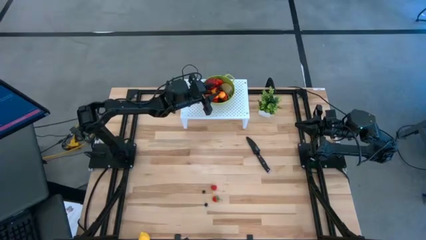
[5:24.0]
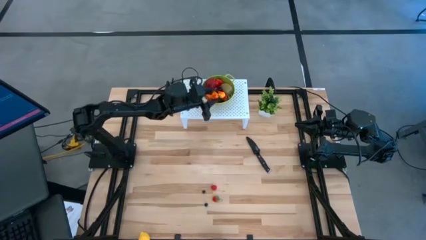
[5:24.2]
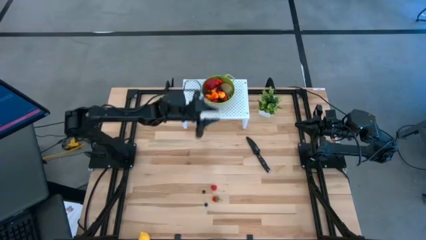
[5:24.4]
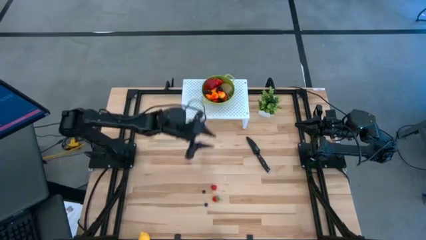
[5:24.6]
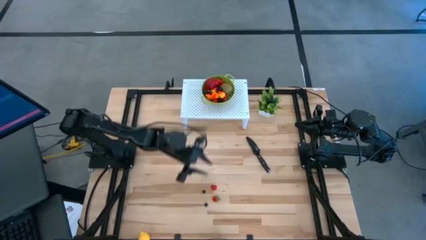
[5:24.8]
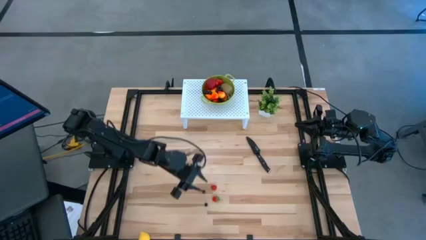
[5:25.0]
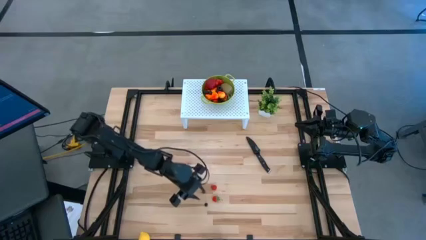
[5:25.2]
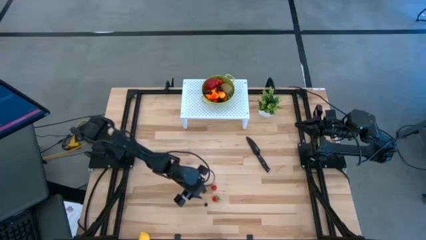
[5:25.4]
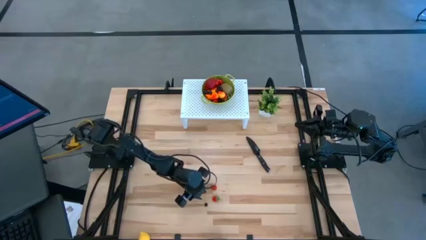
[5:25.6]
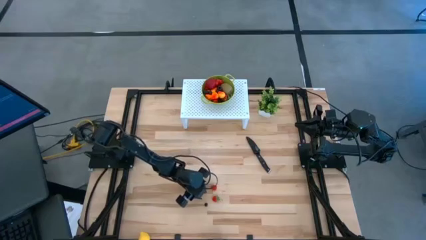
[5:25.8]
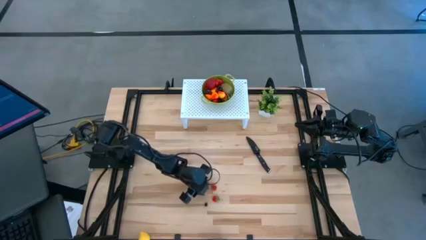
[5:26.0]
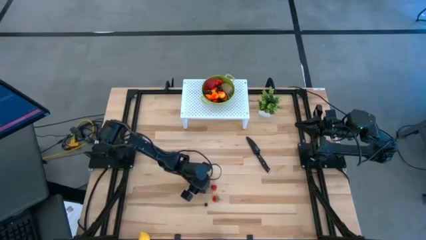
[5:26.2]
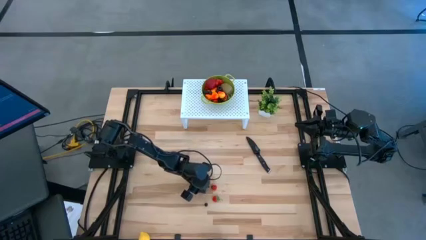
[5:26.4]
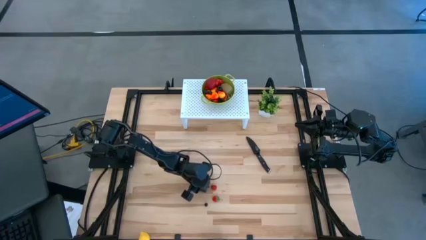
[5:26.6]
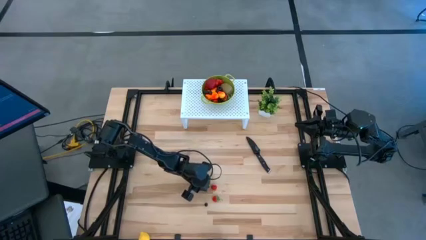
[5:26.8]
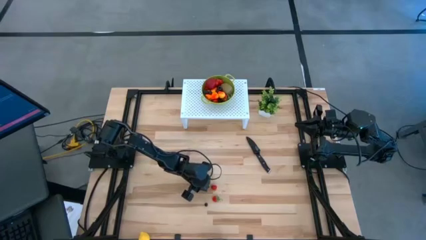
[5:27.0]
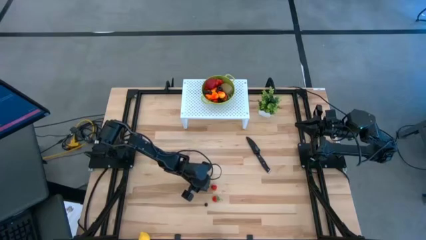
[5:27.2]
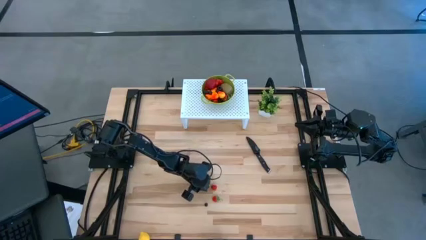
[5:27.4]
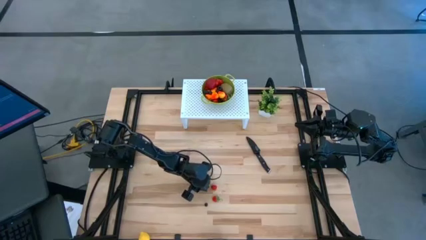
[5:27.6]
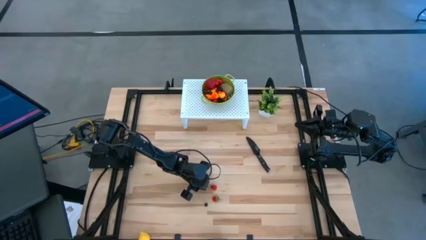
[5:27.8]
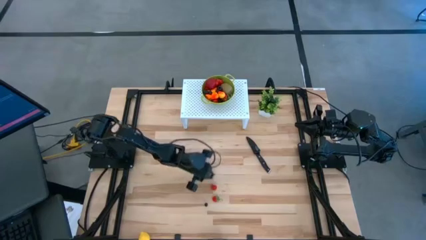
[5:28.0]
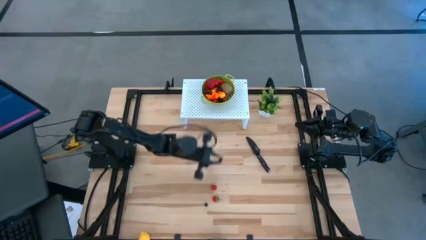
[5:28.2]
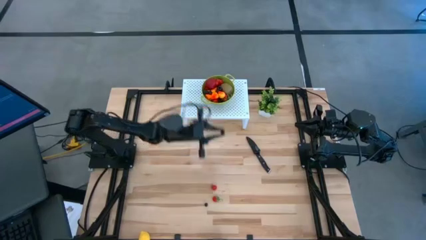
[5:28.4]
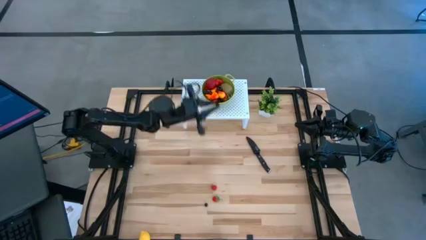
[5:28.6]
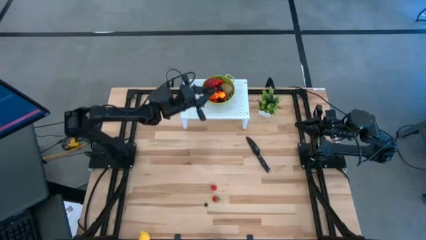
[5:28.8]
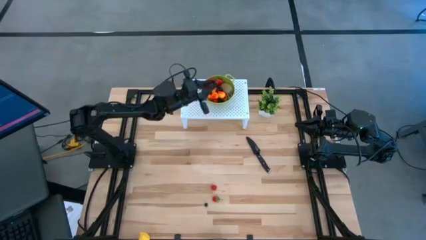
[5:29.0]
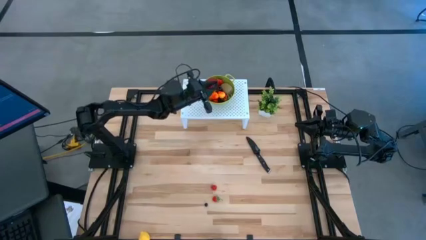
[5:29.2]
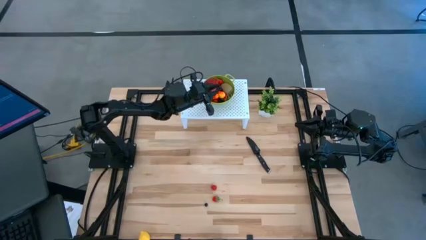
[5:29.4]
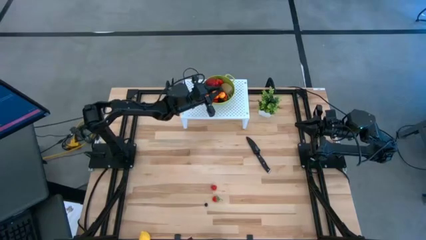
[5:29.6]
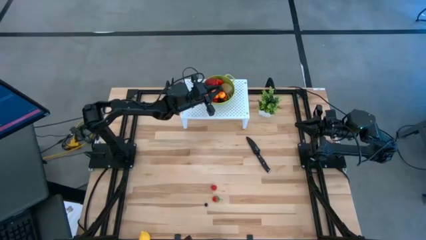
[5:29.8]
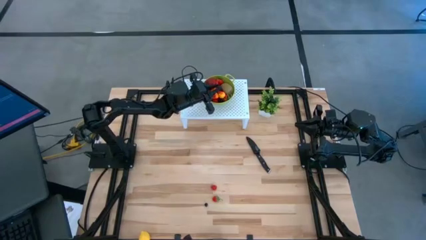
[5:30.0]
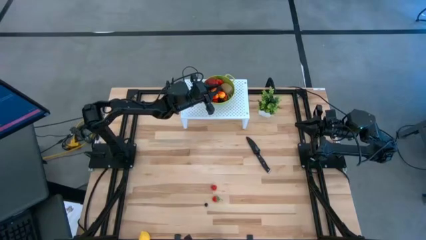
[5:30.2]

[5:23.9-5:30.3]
Task: Pick & Place Fruit
Put the black blueberry into the green strainer bowl

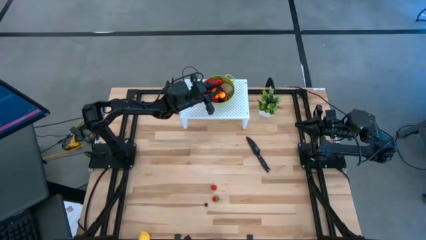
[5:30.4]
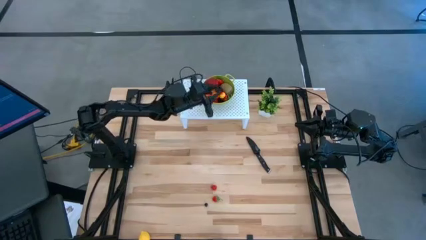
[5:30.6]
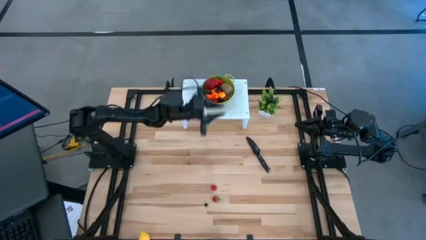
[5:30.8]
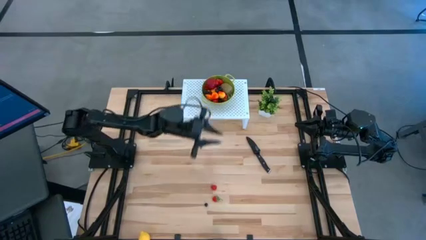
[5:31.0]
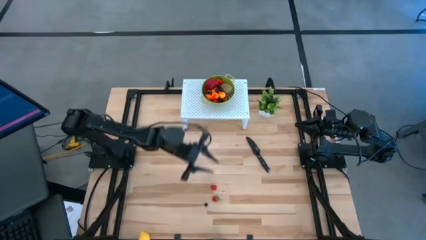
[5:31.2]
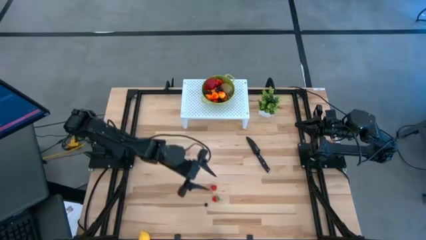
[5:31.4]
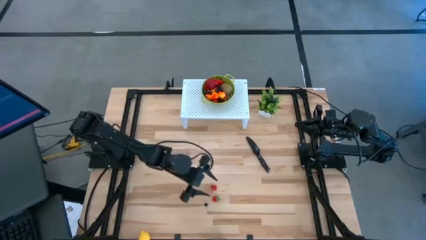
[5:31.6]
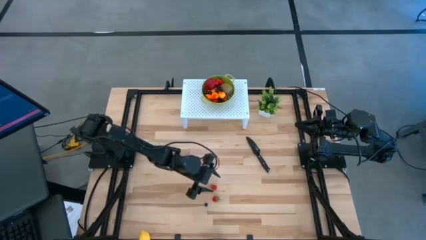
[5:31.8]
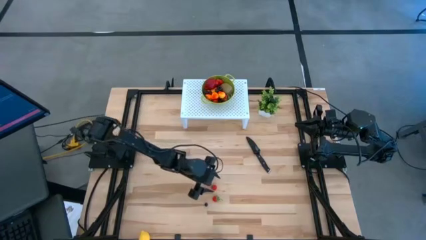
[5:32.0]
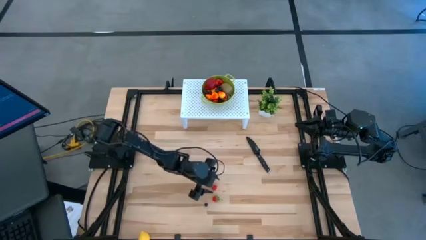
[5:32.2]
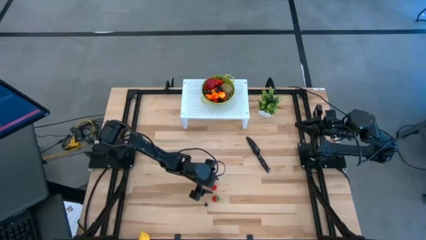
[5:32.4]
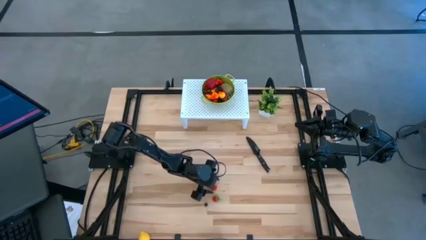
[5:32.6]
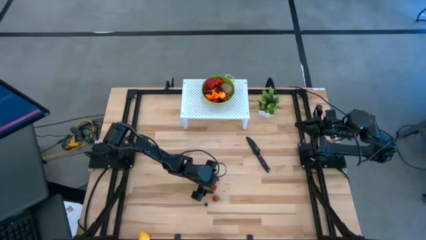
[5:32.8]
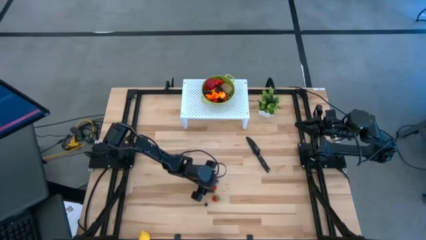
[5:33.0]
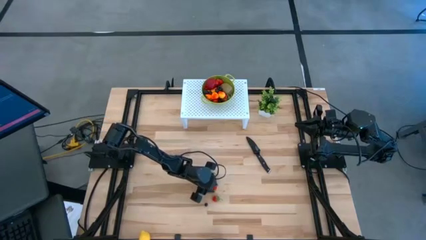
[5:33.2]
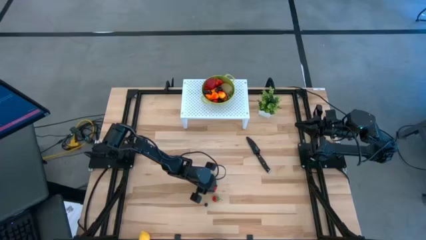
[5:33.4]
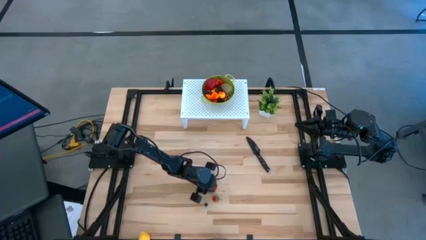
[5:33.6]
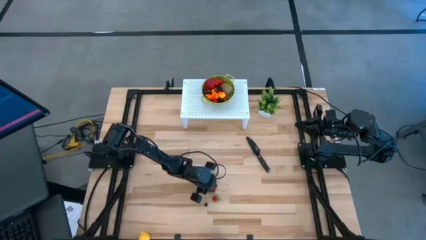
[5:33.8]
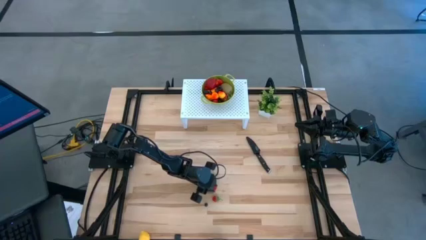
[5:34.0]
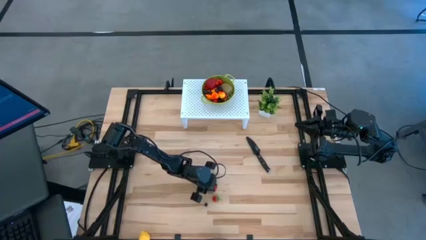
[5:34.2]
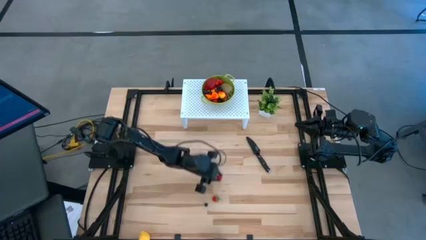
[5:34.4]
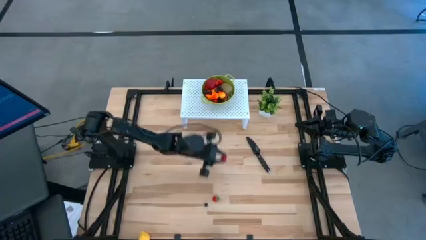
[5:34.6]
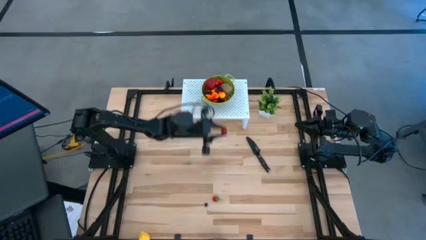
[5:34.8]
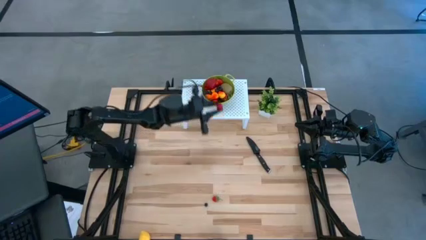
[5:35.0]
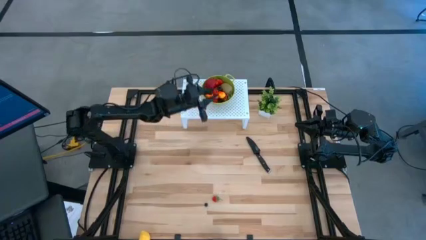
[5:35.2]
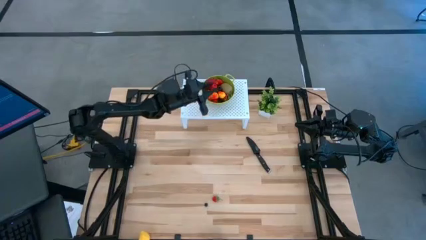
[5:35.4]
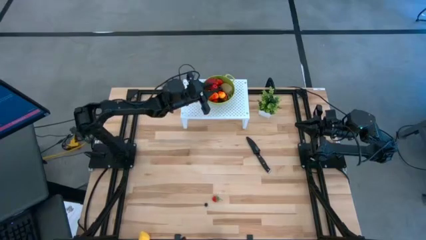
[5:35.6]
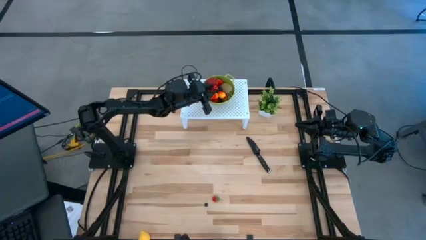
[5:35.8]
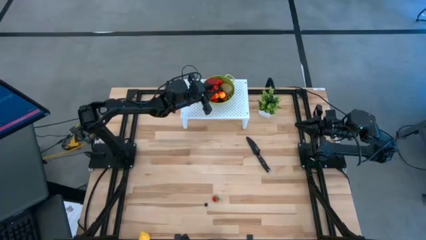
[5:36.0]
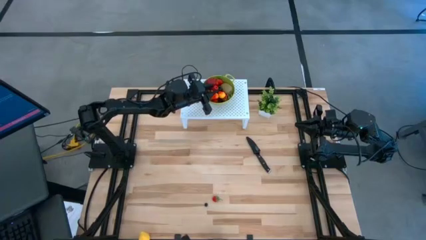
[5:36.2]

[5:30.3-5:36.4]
Put the red raspberry into the green strainer bowl

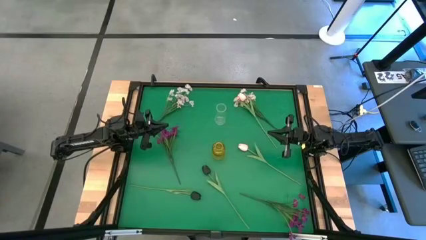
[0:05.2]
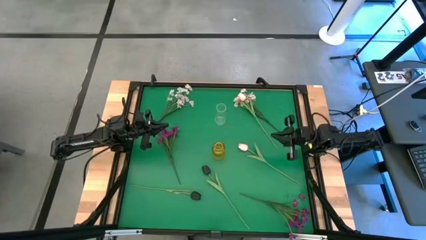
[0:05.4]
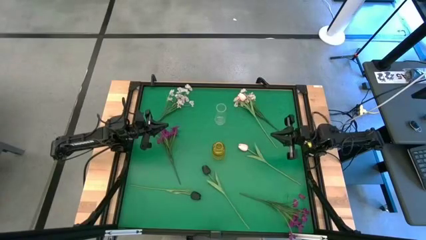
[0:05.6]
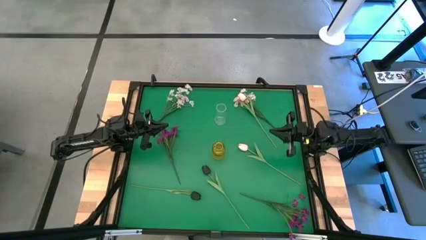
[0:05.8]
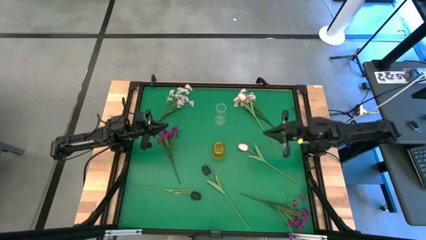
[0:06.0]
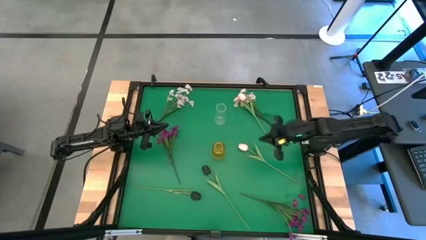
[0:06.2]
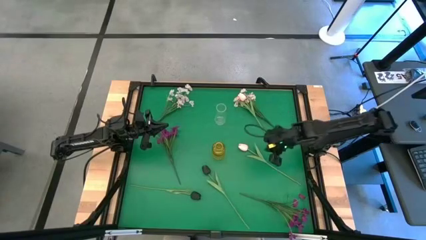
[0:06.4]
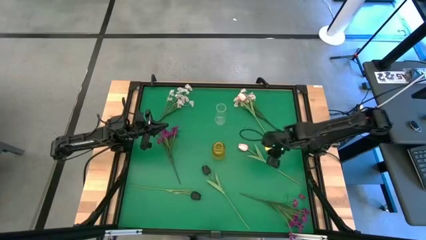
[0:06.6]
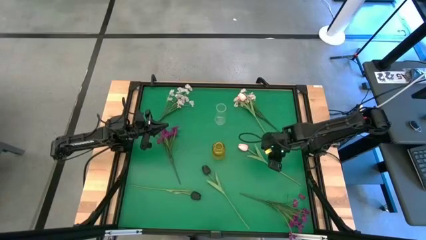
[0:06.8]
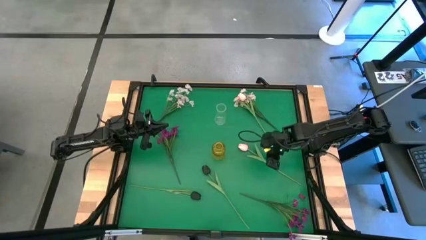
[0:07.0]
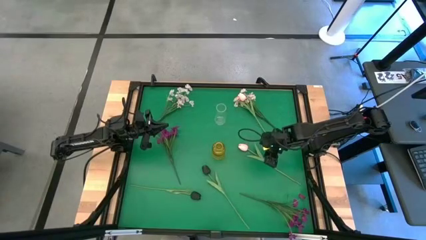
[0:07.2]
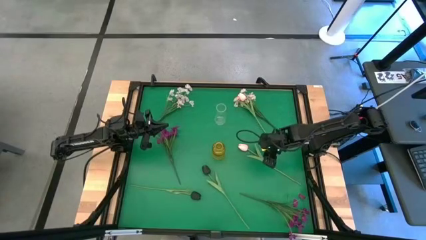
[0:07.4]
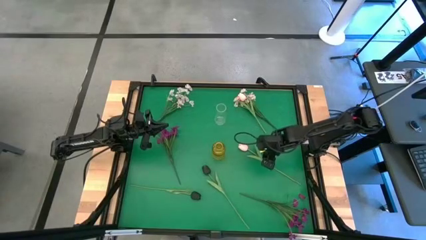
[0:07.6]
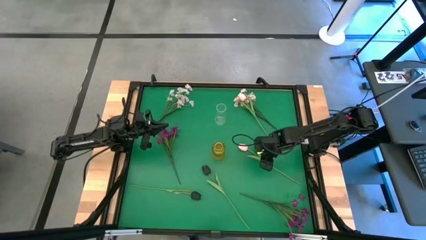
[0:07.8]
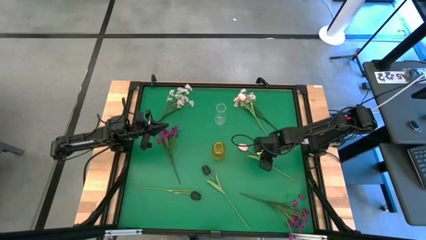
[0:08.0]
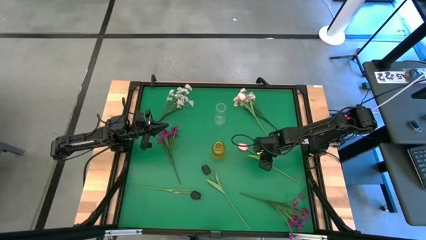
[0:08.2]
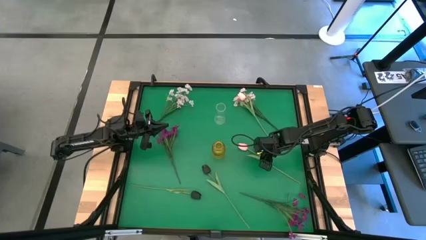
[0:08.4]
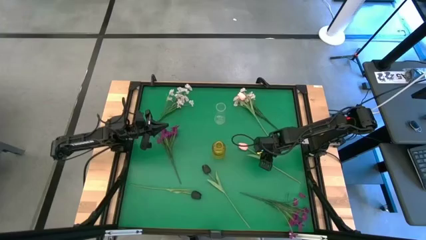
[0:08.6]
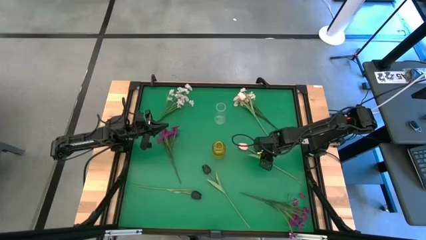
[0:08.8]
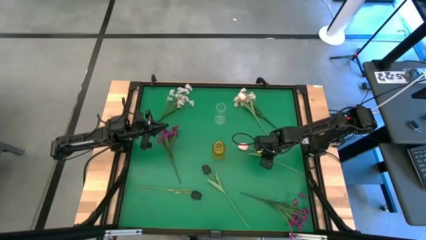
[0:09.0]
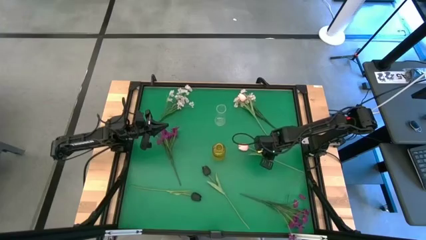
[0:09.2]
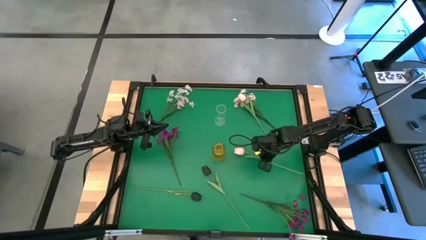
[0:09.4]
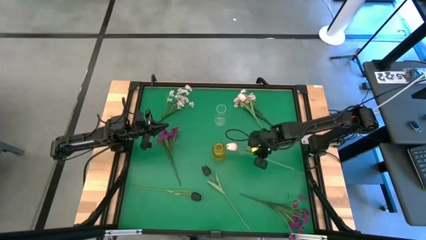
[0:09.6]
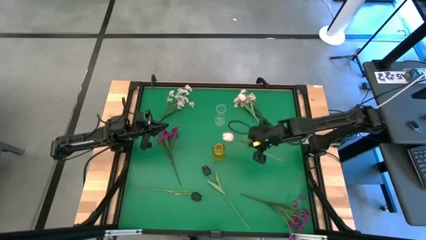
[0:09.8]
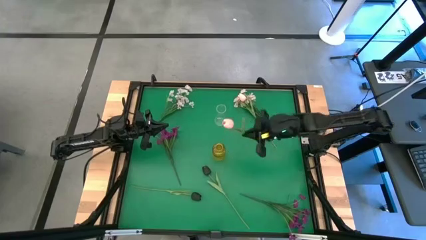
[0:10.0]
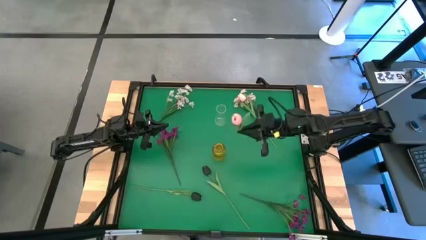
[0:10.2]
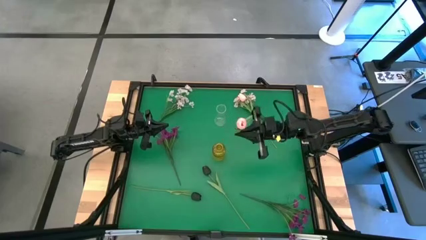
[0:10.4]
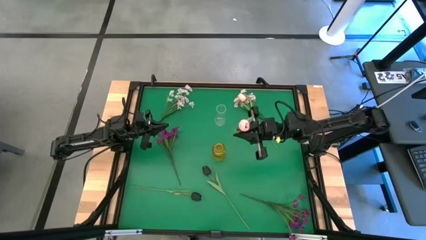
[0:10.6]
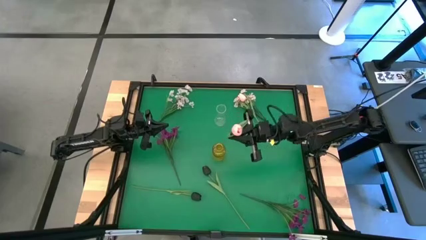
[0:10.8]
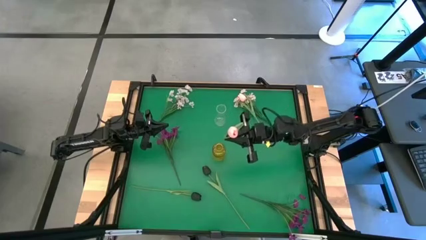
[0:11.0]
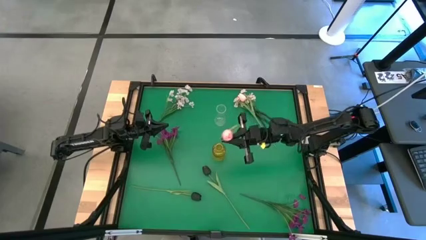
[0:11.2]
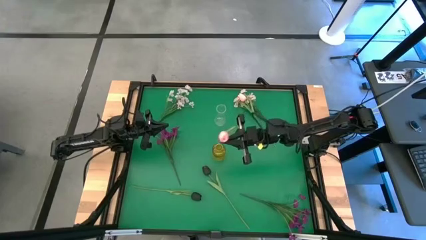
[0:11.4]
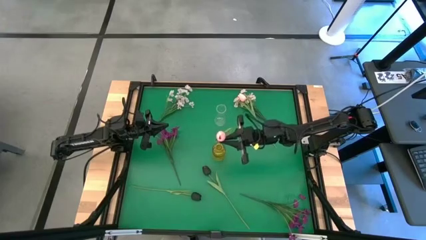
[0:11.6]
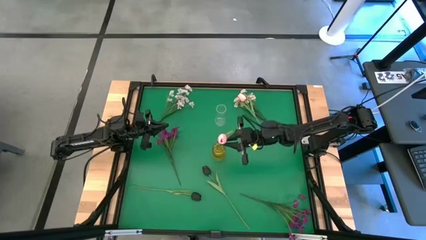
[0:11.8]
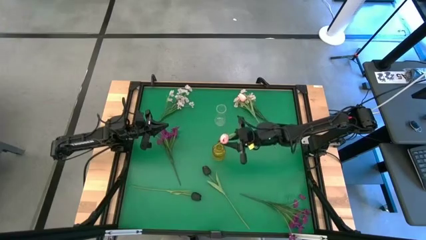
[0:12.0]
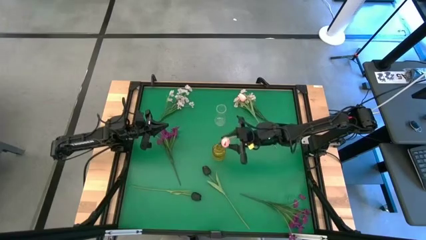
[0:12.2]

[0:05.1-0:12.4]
Task: Sort flowers into vase by color
Put the bottom pink tulip into the yellow vase
